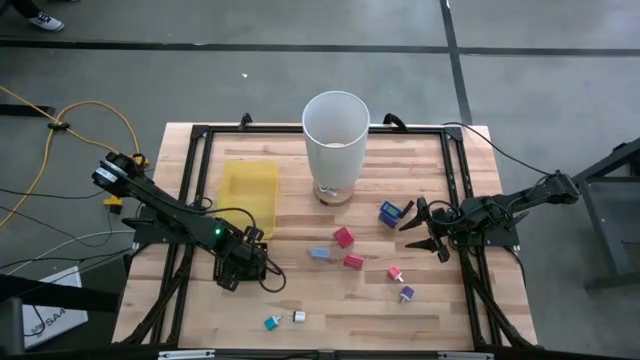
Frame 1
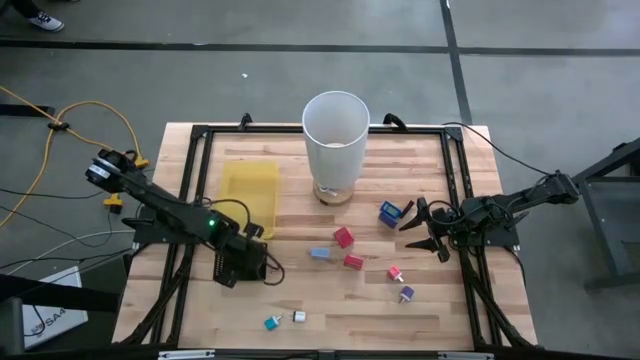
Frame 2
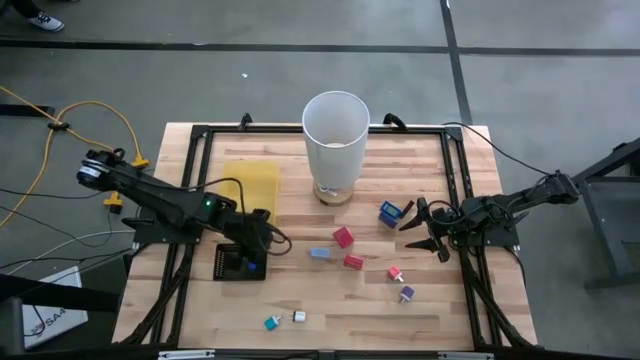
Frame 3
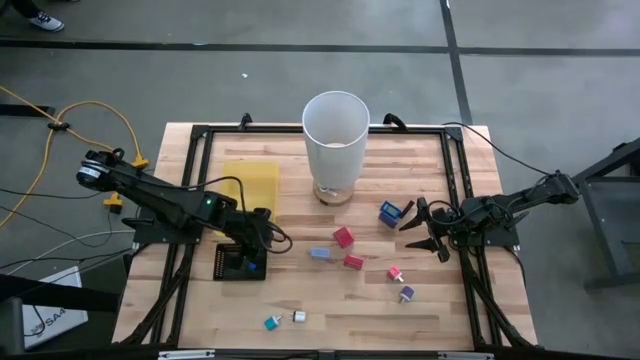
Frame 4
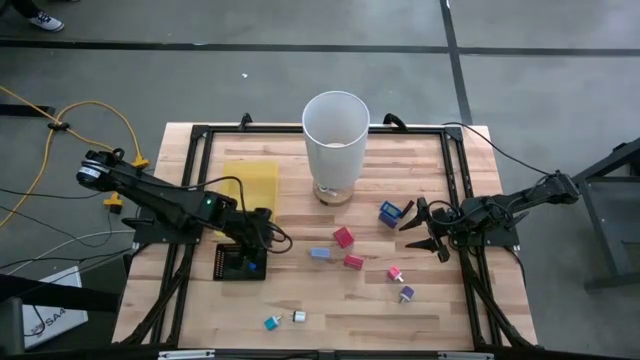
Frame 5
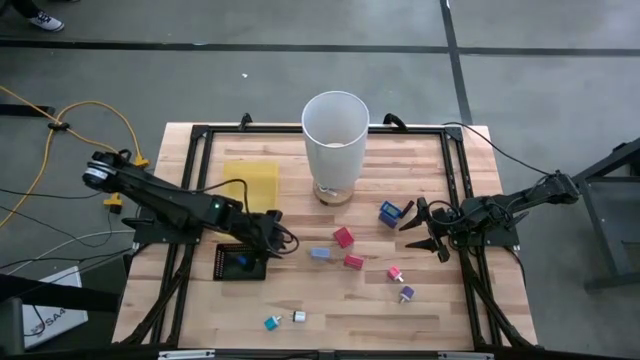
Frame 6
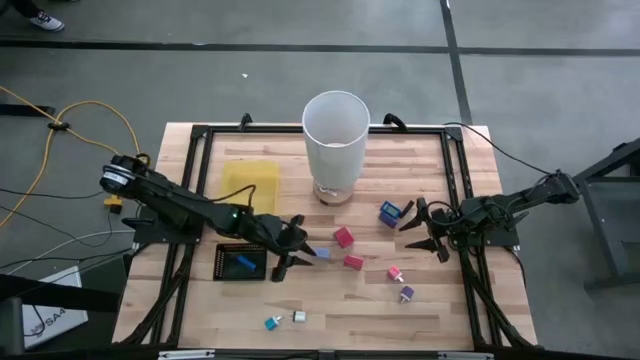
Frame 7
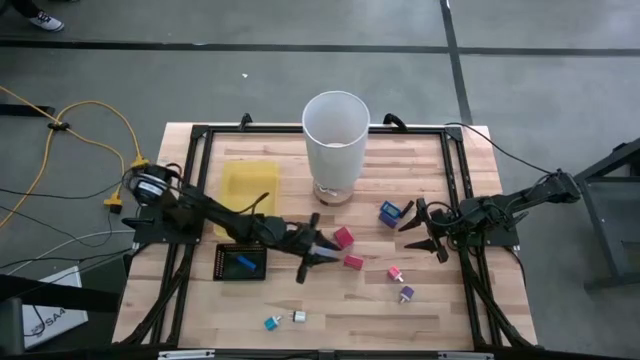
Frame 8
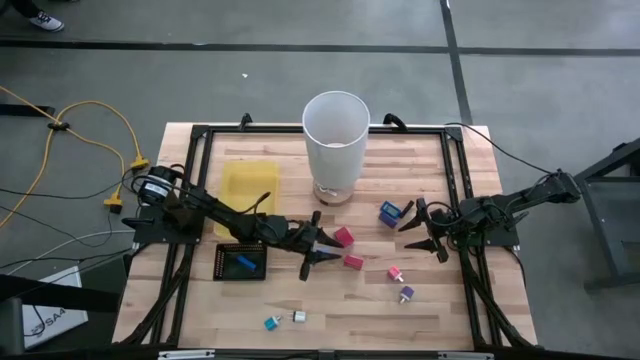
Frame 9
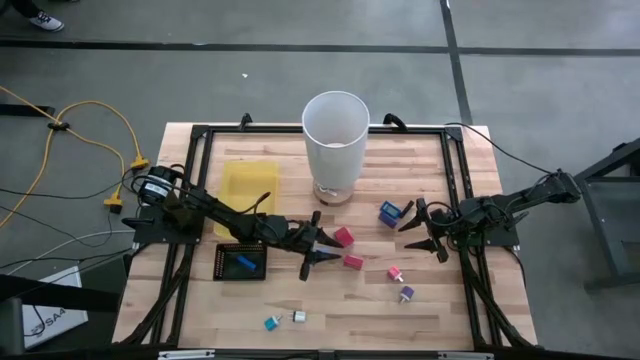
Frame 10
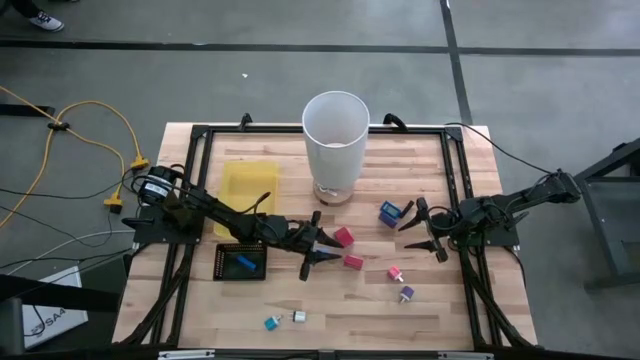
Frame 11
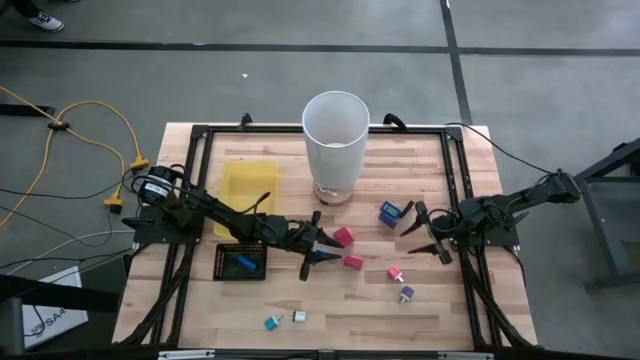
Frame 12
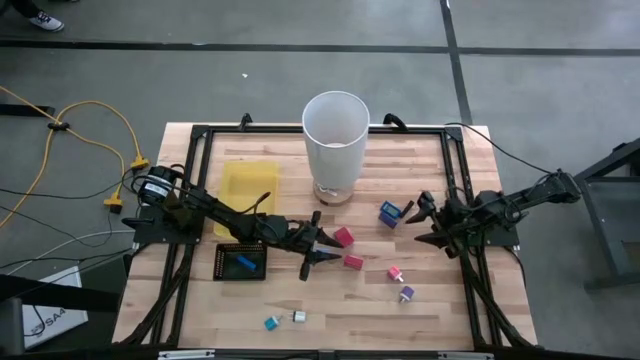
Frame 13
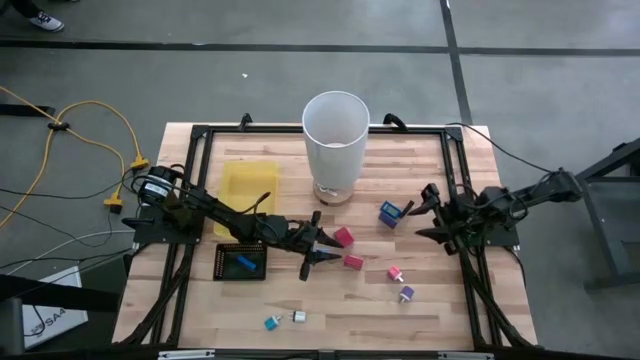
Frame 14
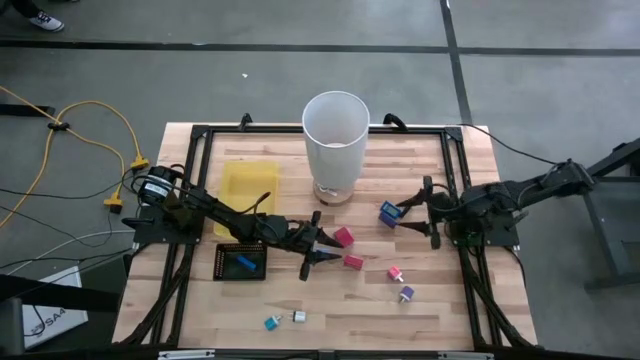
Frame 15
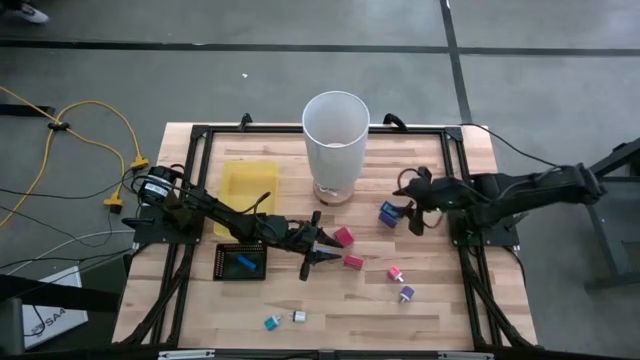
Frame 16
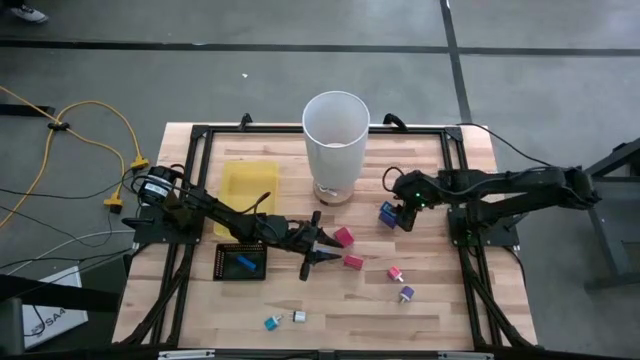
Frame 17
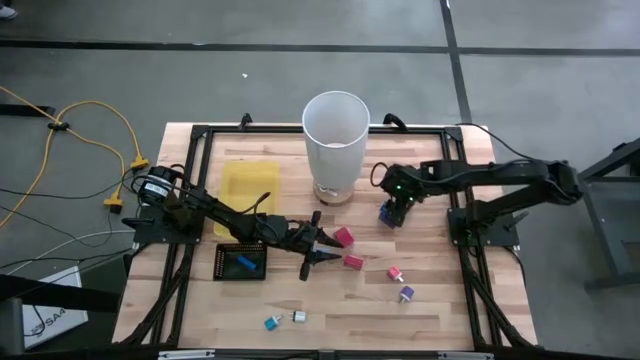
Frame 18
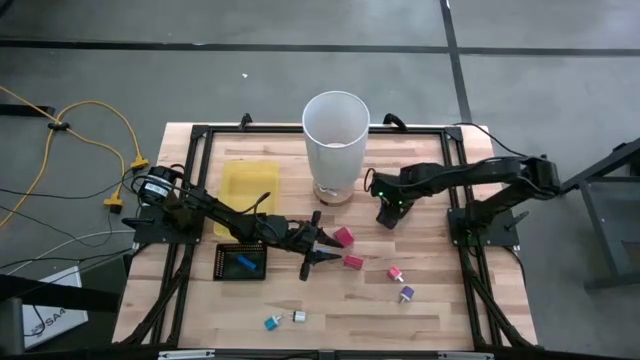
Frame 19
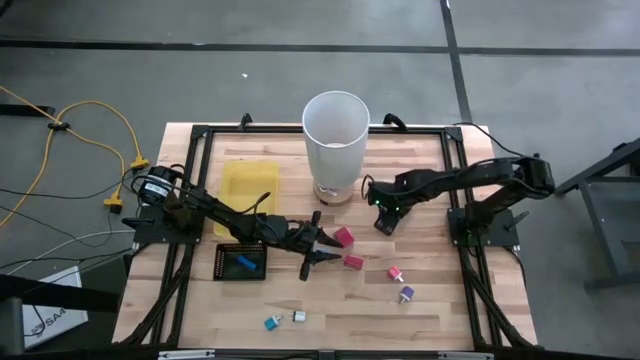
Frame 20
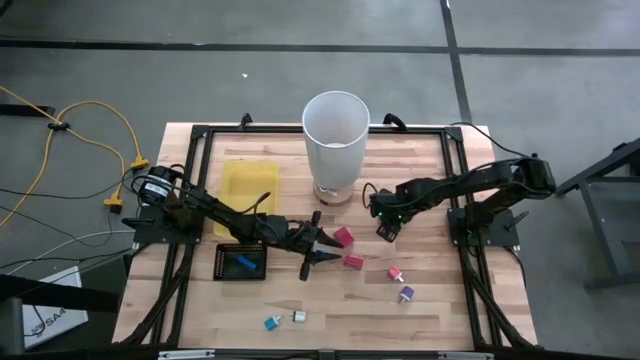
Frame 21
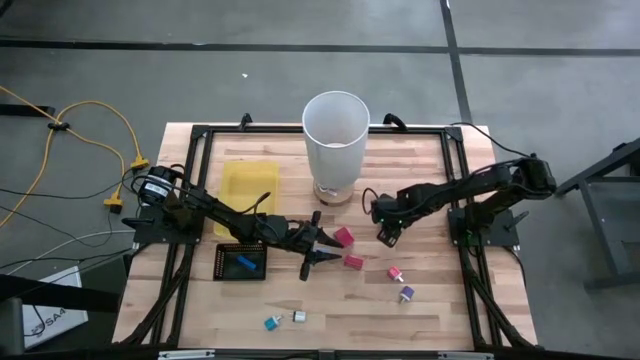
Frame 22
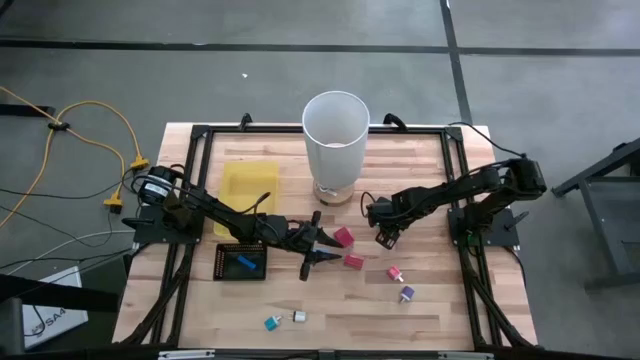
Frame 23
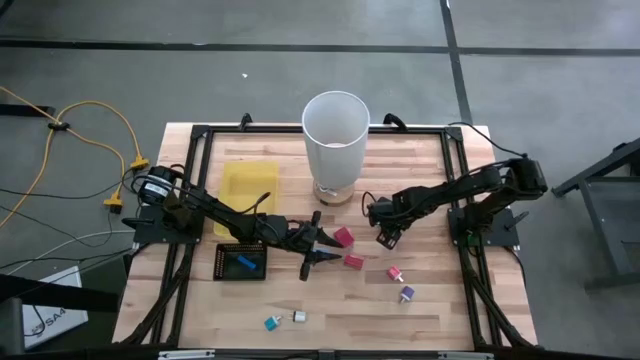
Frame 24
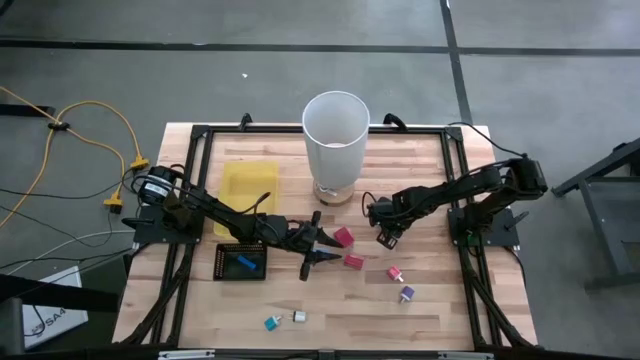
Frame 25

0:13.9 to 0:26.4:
Task: Pick & Place Office items
Put the violet digital clock into the black bin

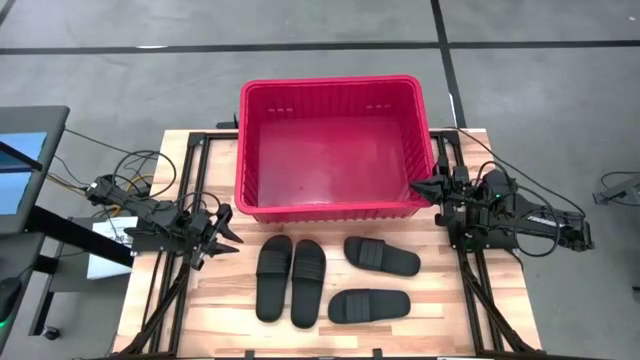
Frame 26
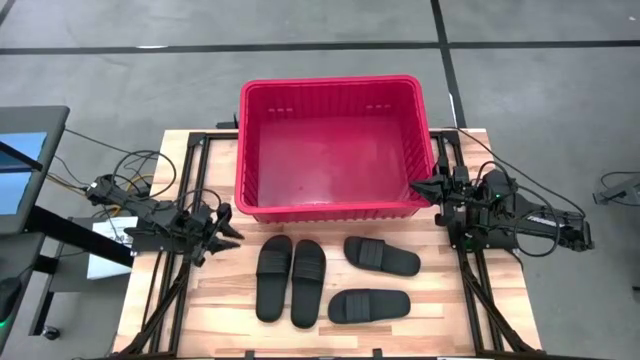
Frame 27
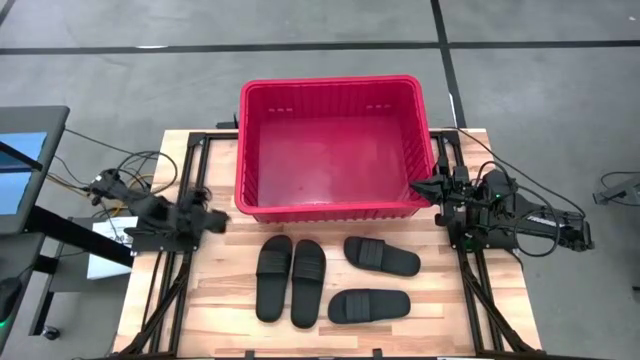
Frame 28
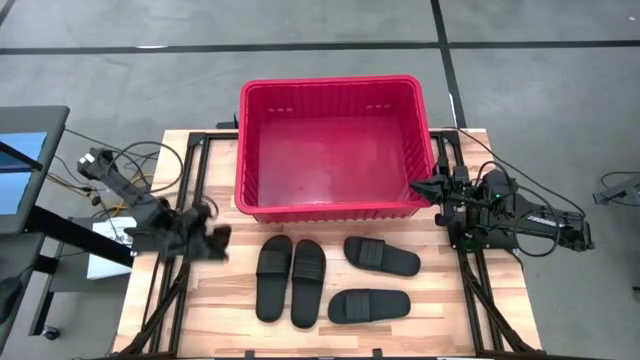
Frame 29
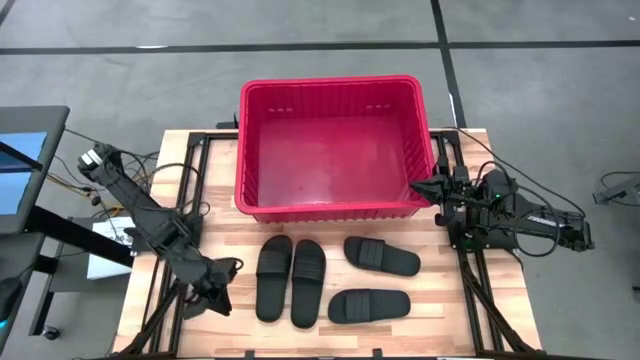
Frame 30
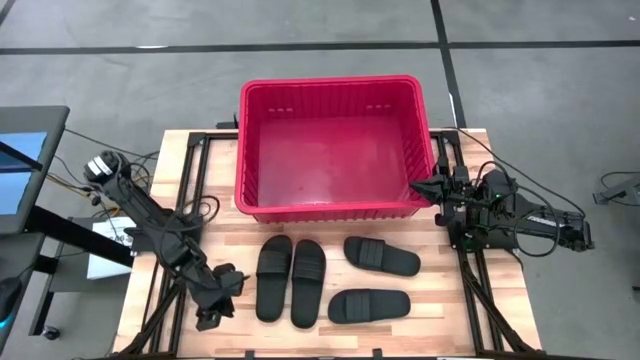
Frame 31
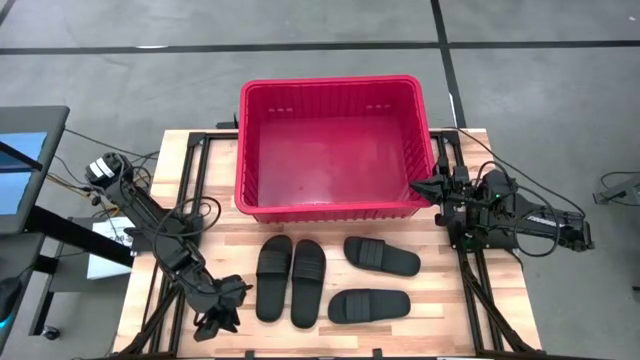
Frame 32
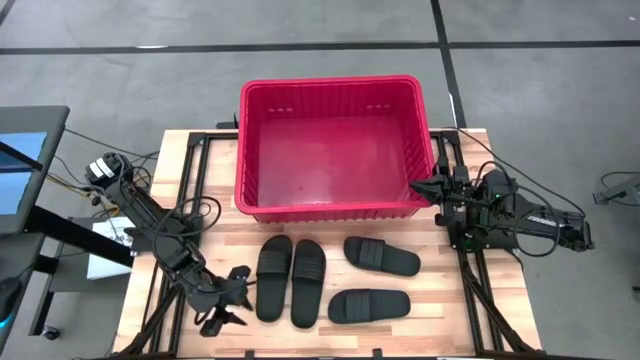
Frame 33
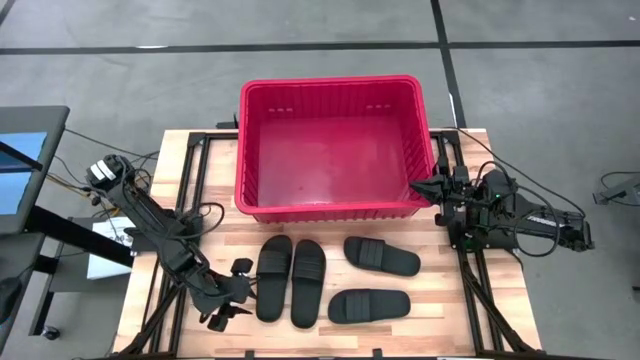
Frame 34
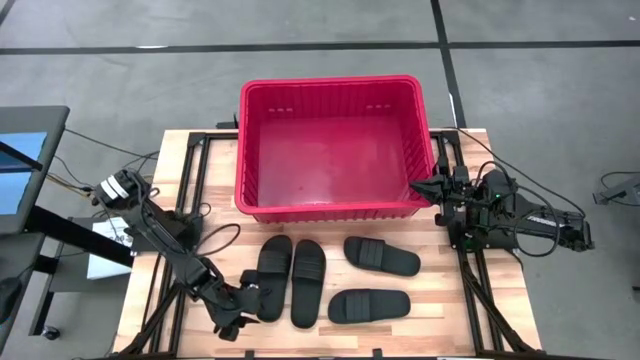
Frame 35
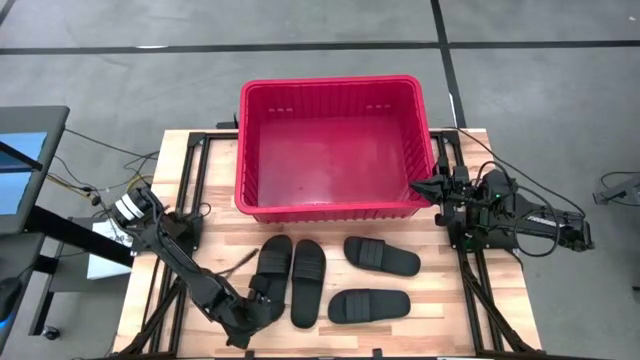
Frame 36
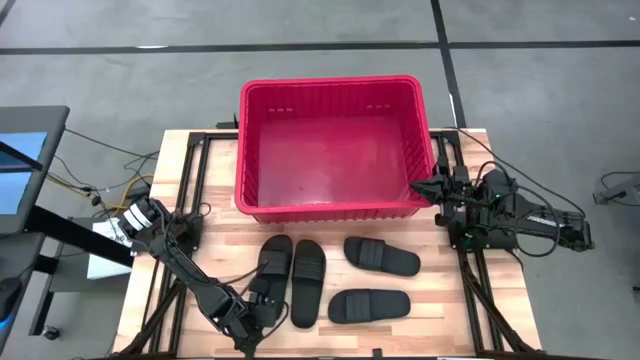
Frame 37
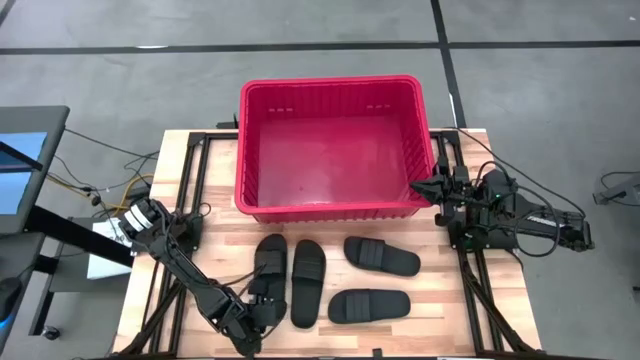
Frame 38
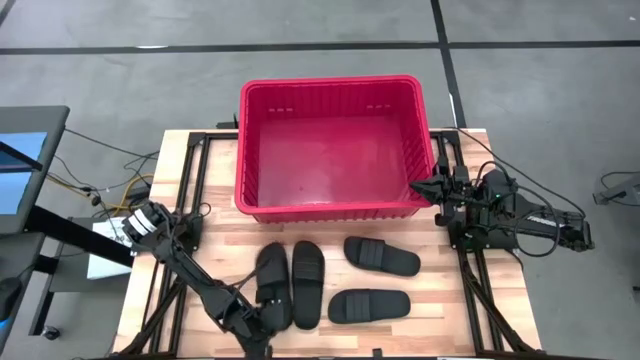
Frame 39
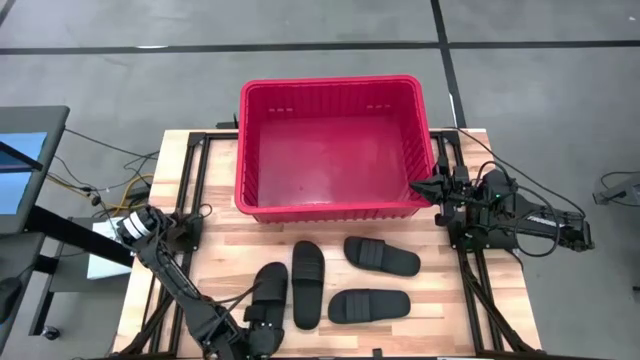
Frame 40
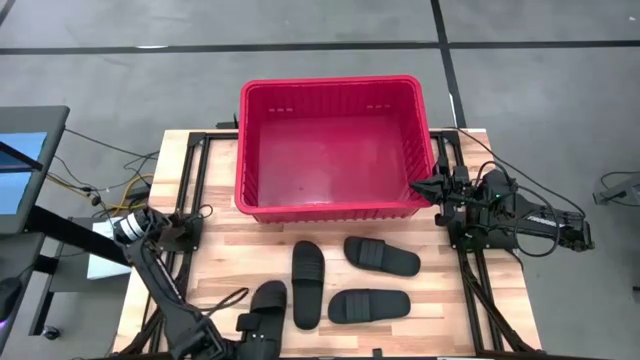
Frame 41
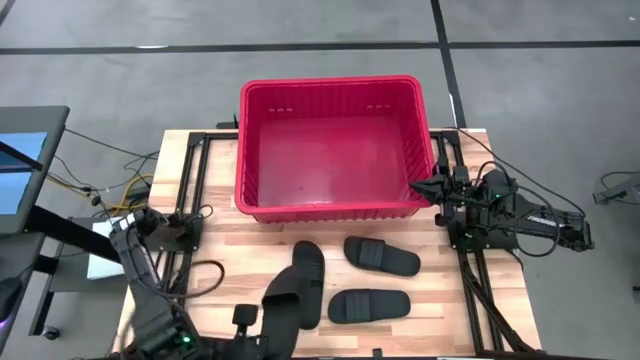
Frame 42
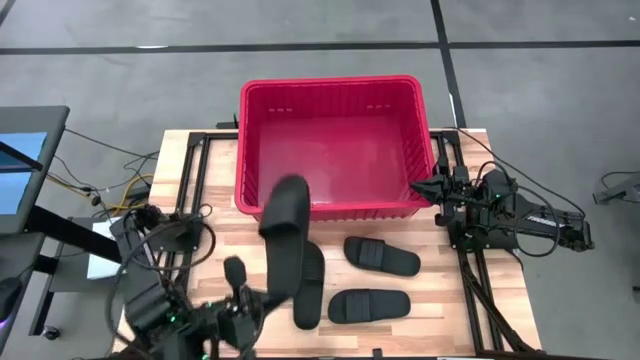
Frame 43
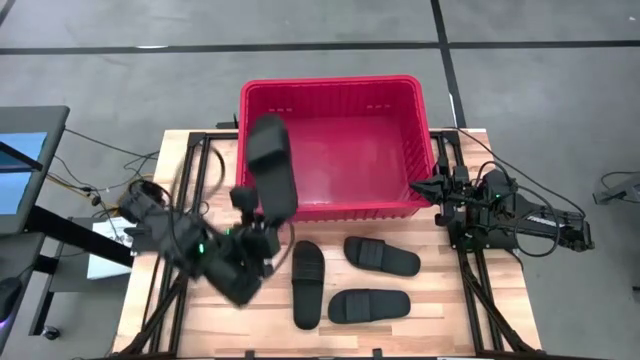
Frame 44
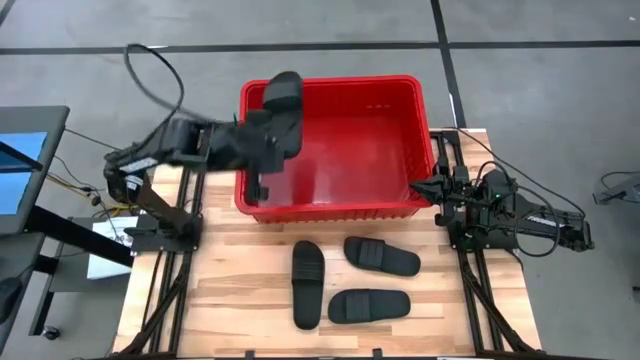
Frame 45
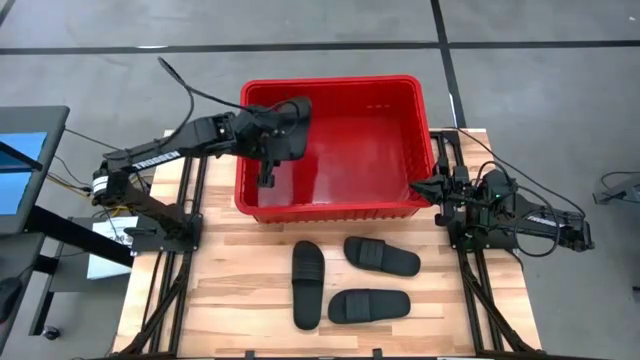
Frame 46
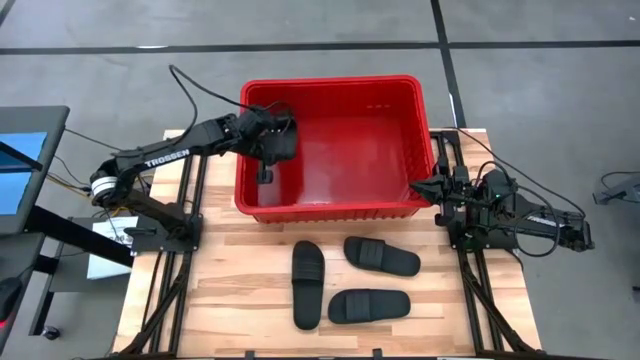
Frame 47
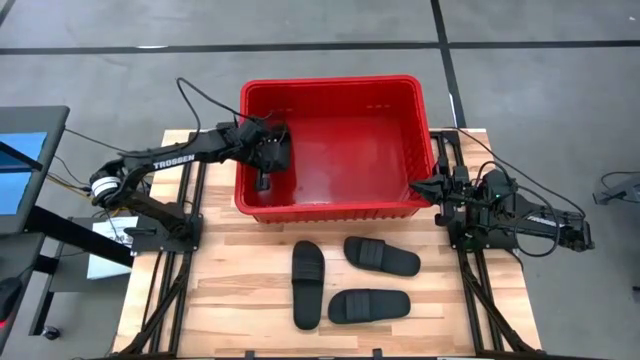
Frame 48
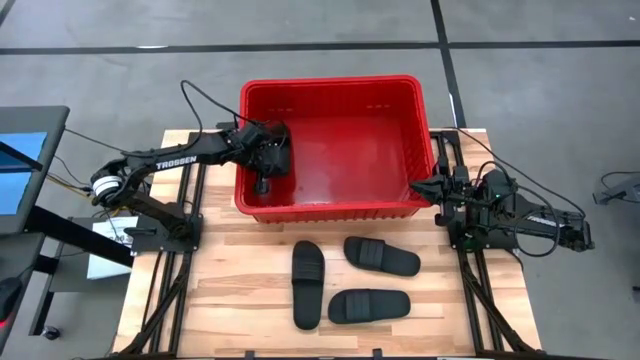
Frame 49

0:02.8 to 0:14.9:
Task: Pick and place slides into bin
Put the black slipper into the bin
